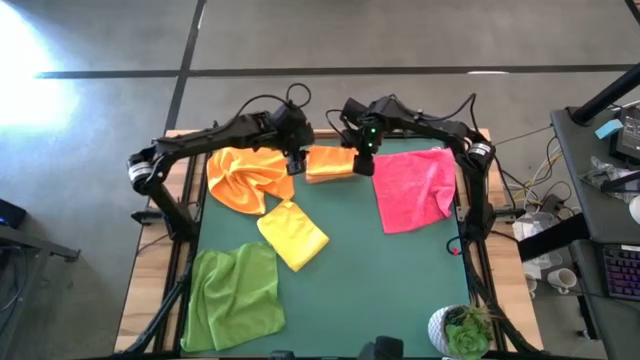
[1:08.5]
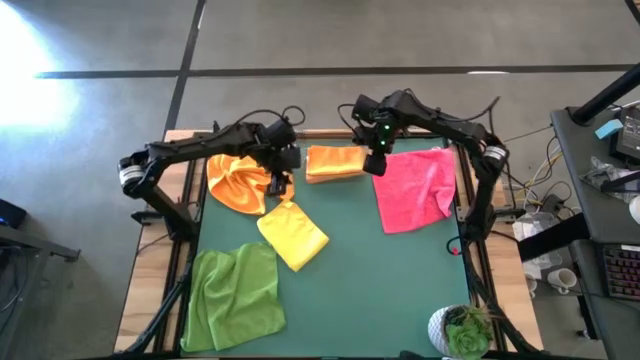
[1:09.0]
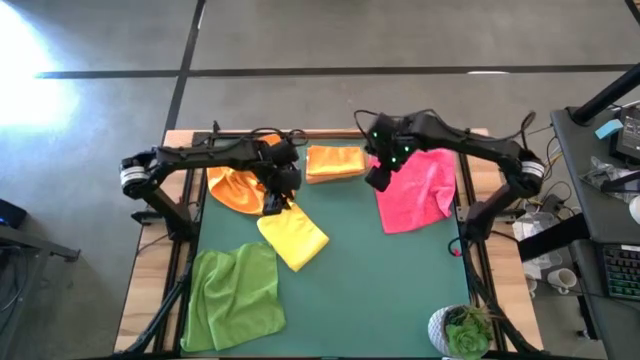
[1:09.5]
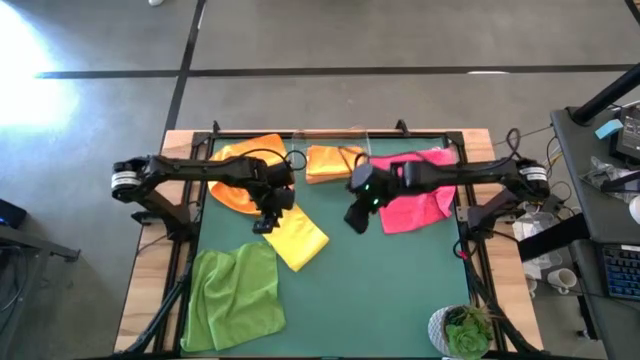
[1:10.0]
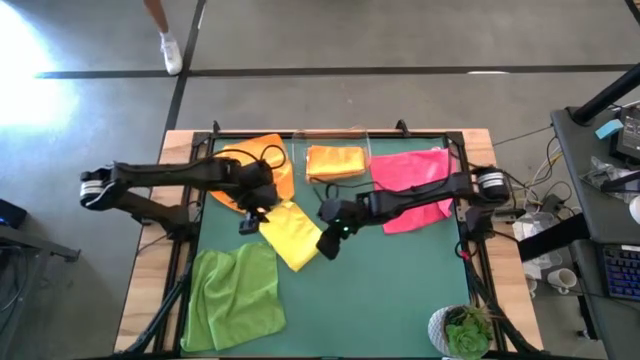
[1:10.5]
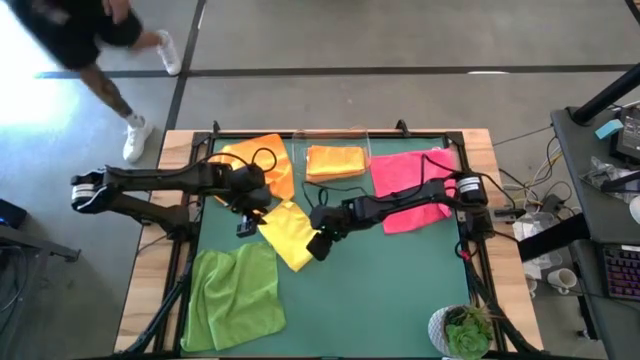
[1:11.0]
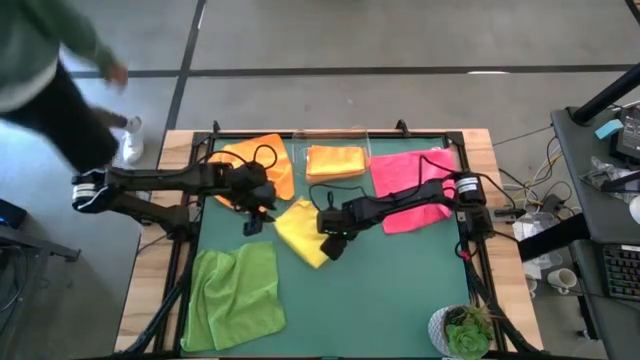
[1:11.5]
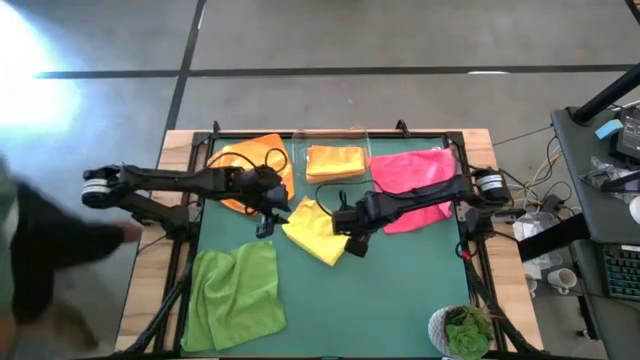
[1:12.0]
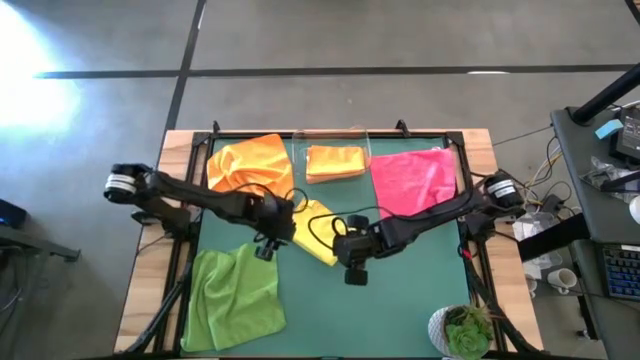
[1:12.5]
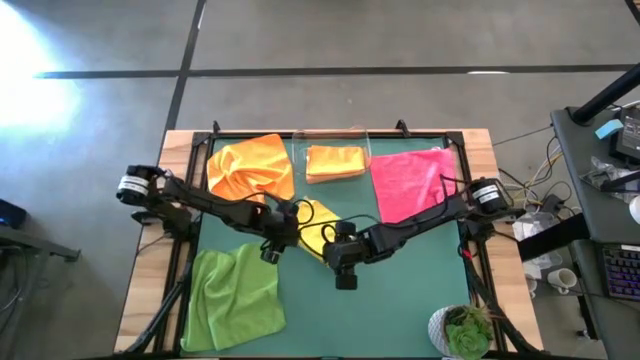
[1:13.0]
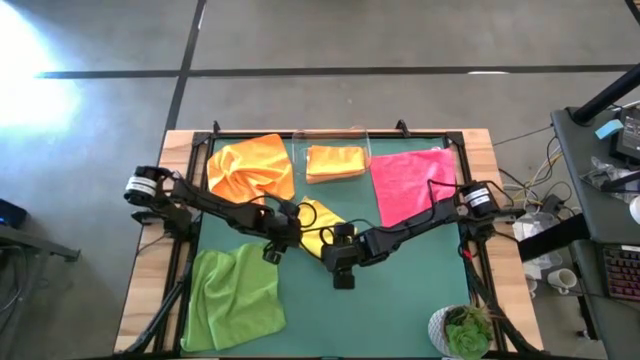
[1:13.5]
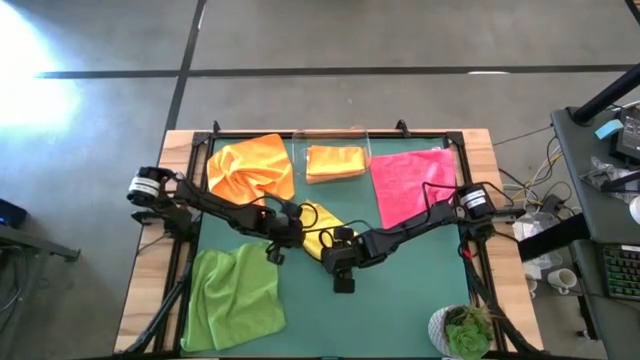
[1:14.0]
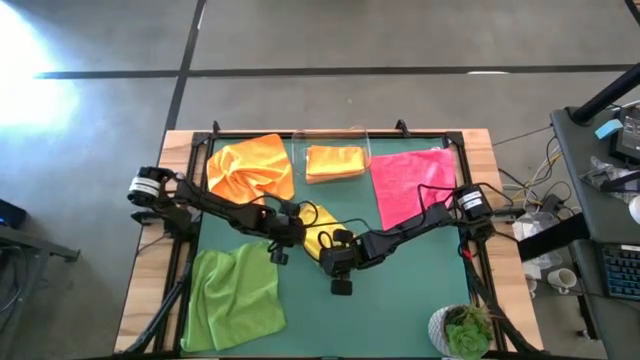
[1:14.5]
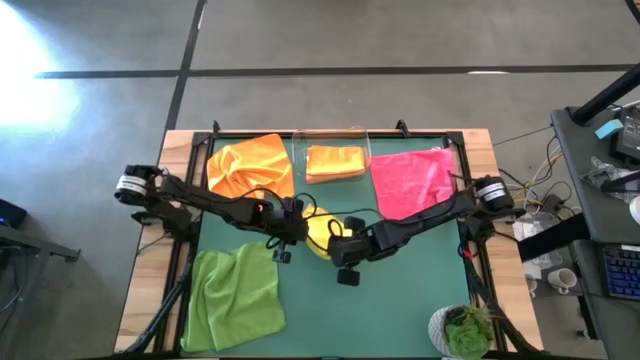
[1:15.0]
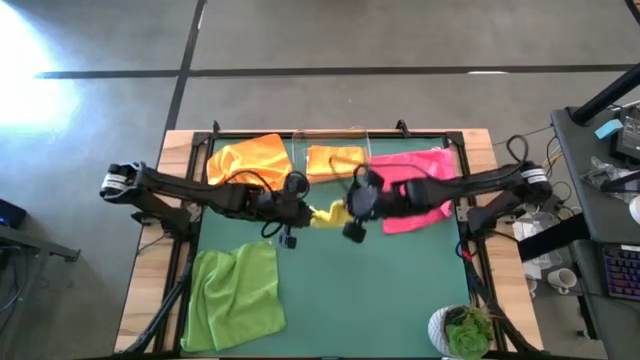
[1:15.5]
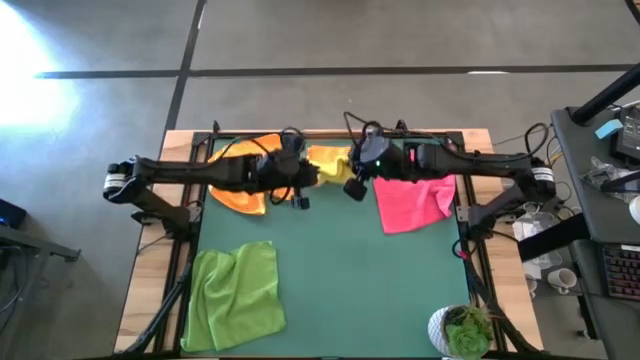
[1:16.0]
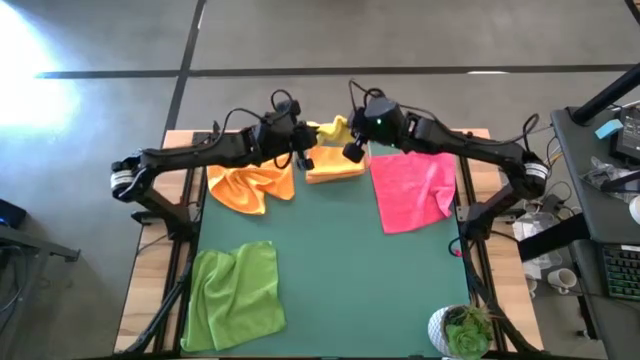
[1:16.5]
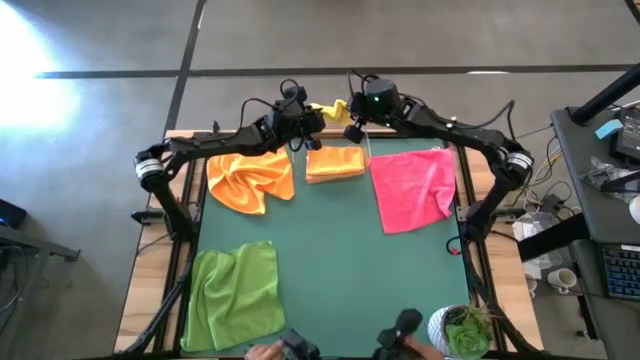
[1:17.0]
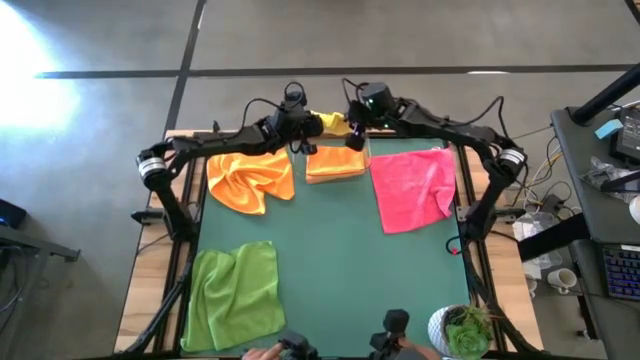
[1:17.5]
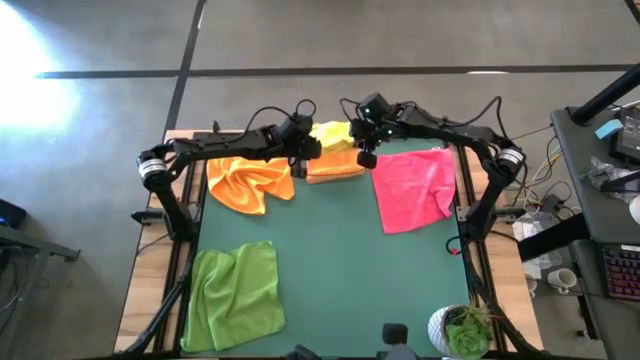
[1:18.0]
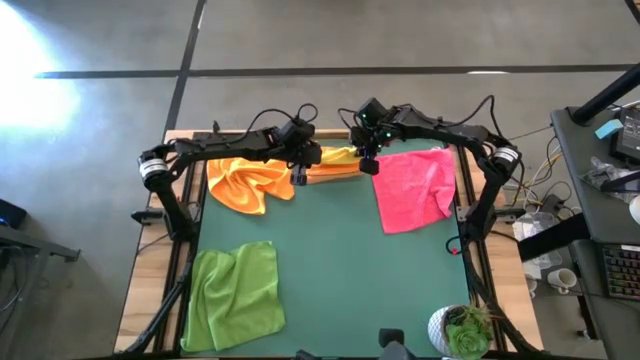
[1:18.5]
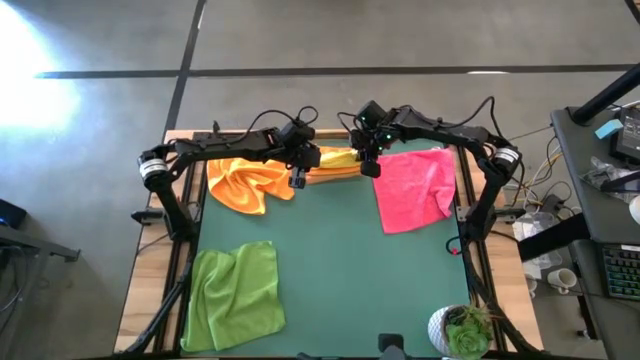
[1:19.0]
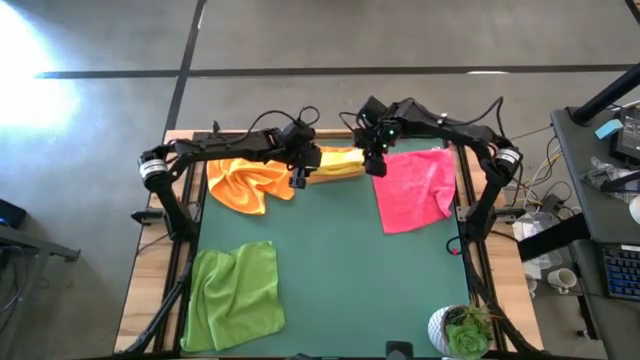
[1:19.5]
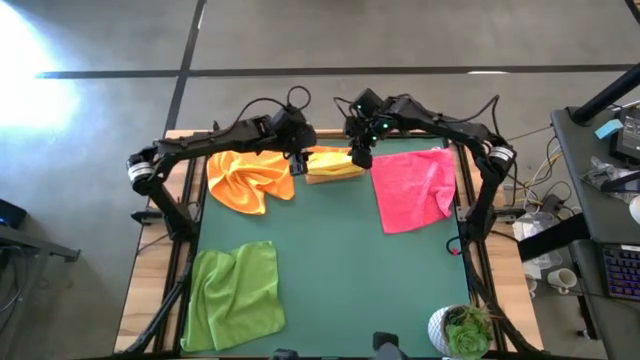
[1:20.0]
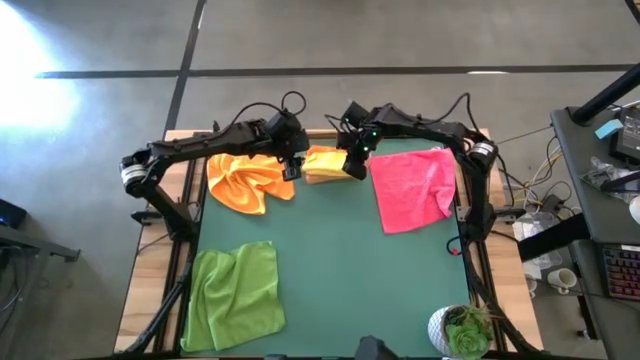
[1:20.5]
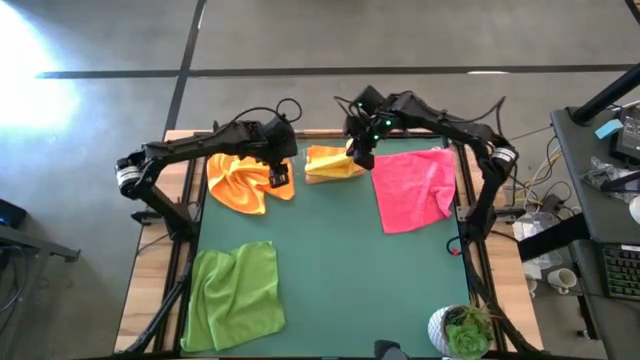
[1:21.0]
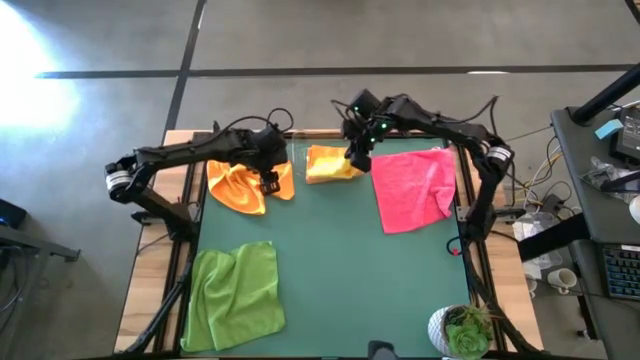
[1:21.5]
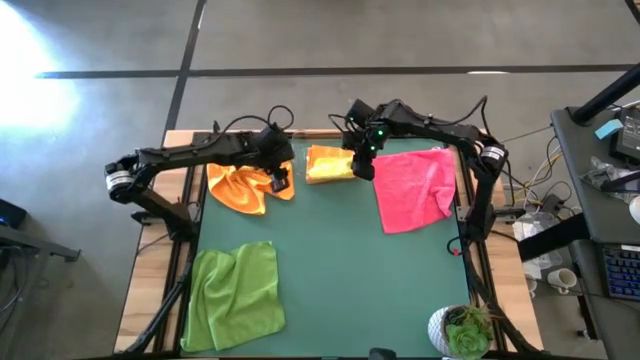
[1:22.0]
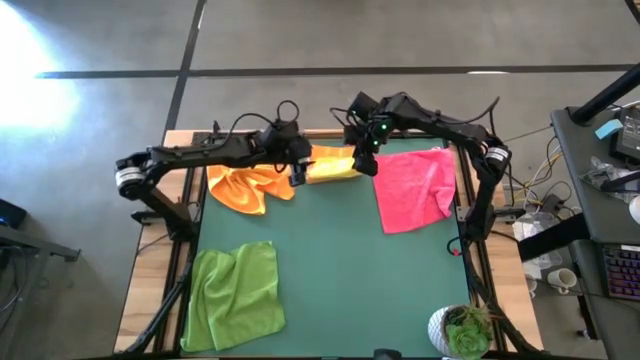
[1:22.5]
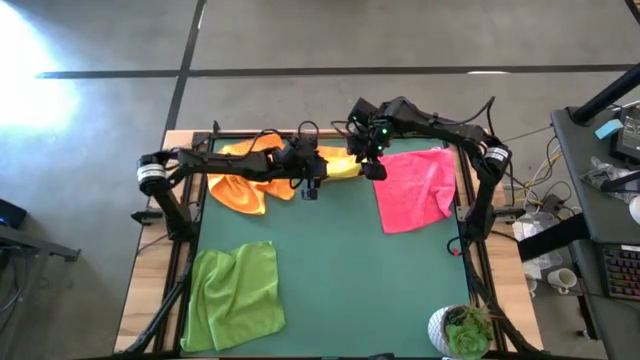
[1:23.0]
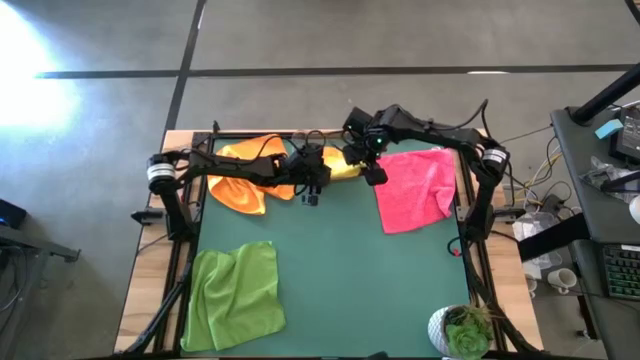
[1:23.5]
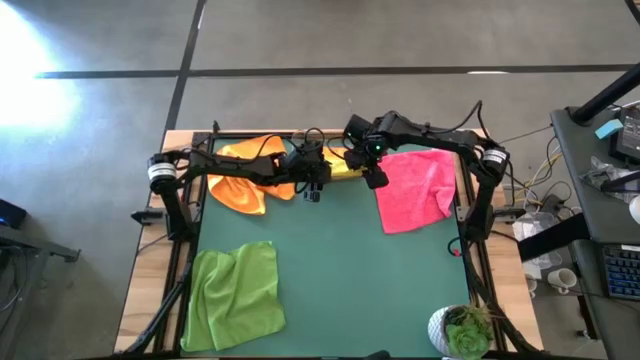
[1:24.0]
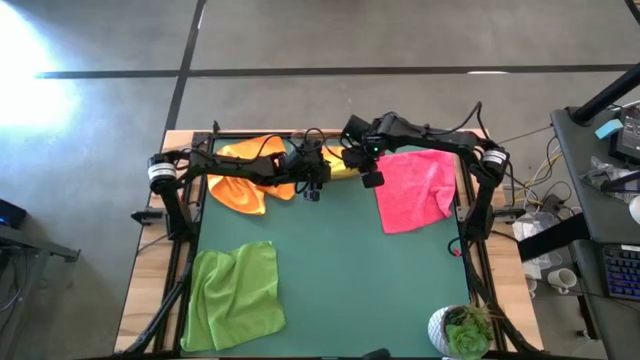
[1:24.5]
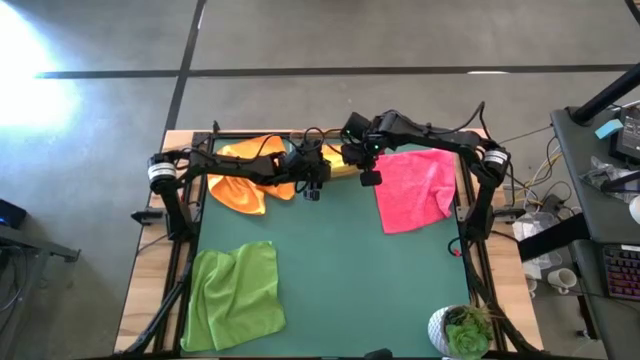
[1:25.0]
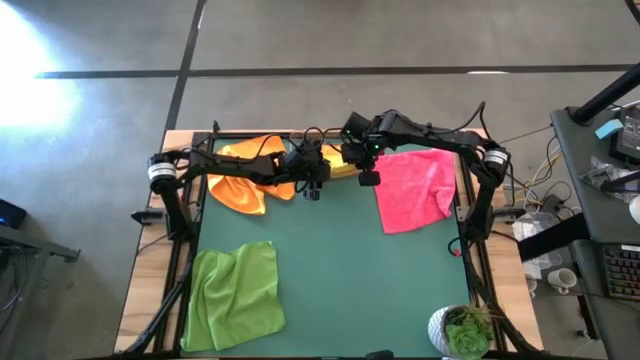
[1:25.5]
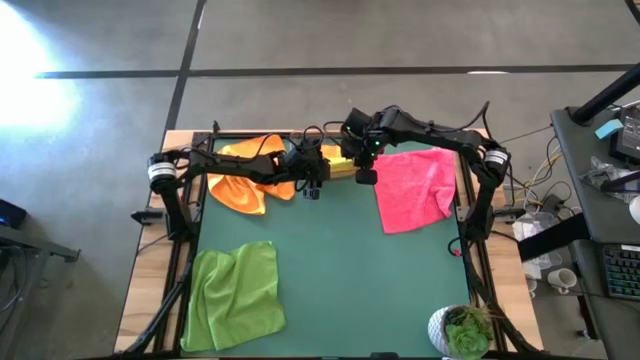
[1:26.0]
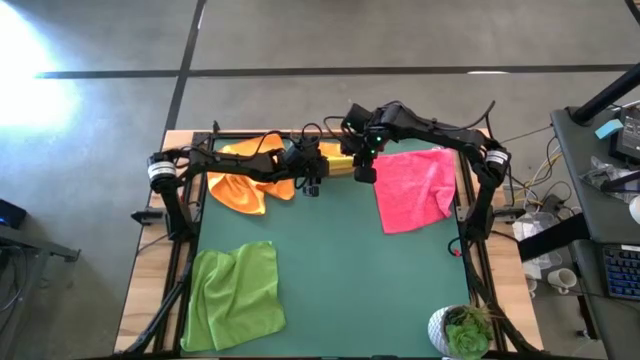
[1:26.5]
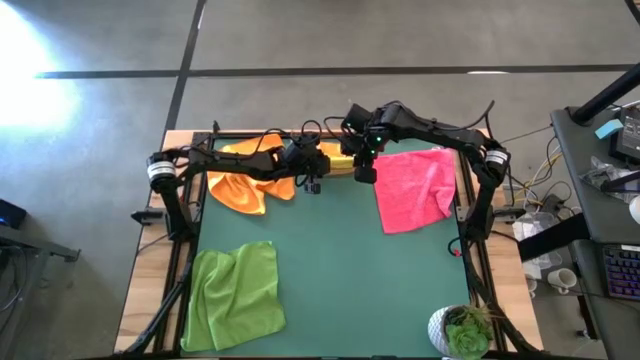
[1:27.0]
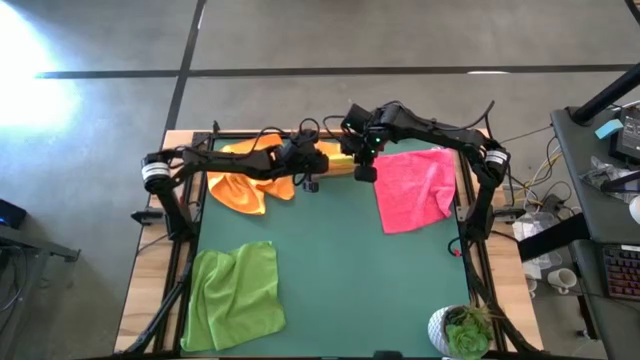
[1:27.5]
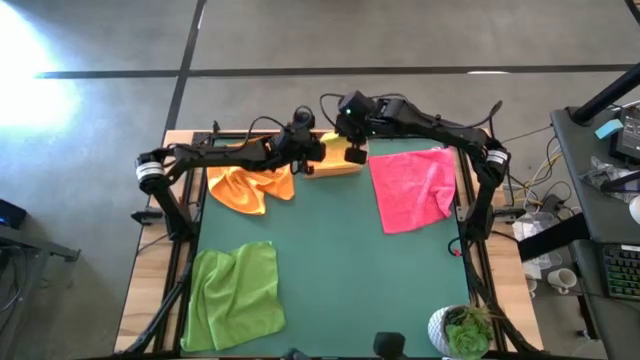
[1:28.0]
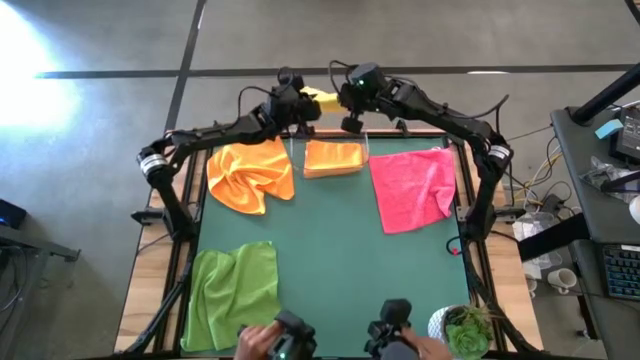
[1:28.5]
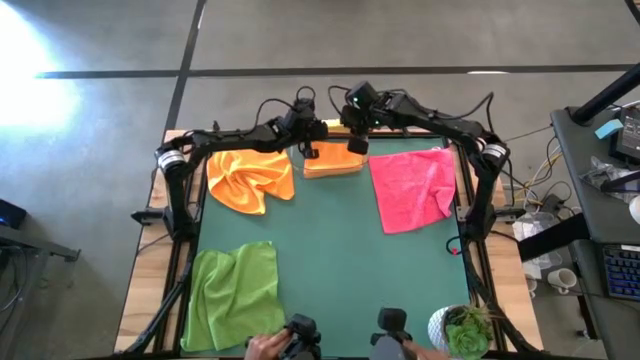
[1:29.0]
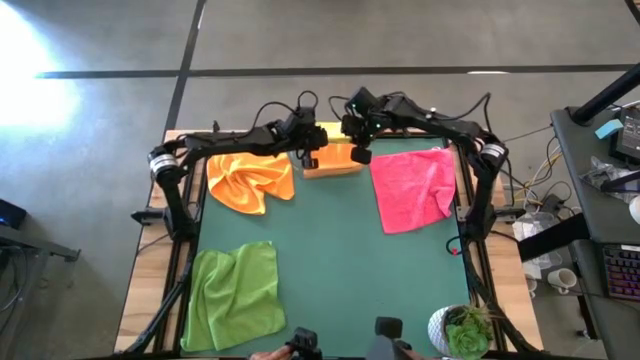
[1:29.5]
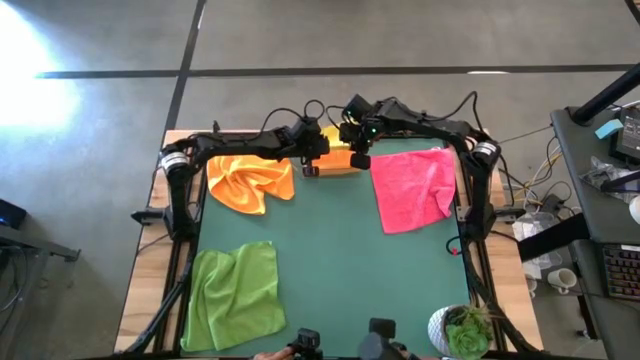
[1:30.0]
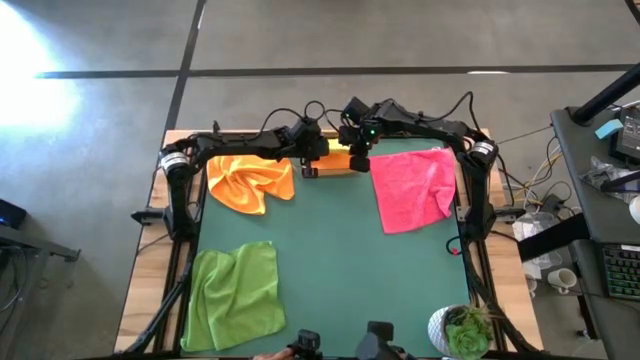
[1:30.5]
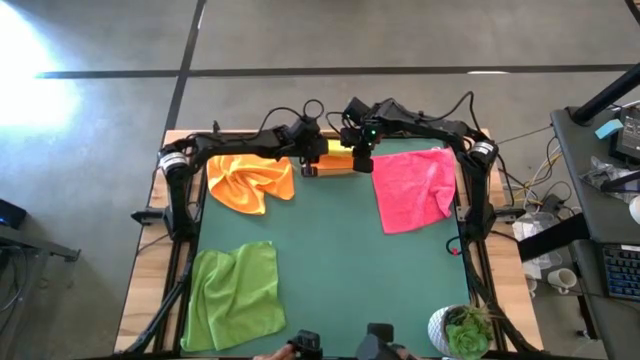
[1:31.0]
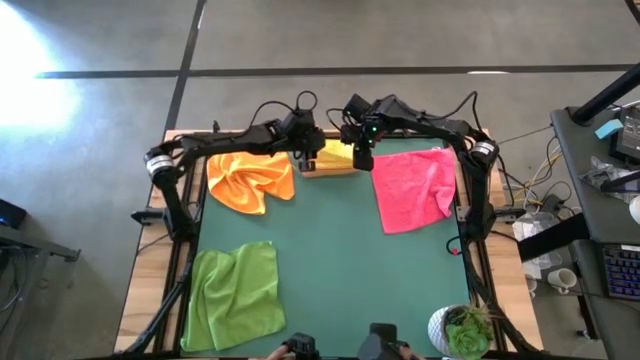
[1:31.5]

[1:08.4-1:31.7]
Task: Fold microfiber towels
Stack the yellow microfiber towel on top of the orange microfiber towel
